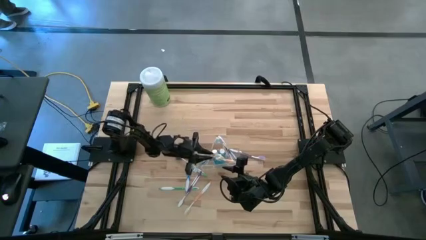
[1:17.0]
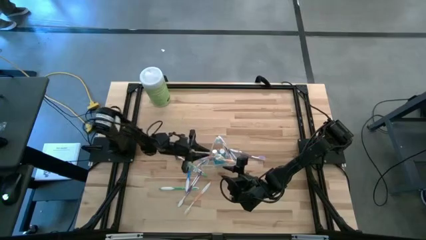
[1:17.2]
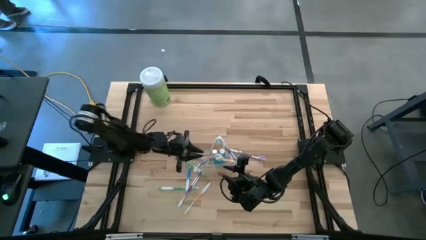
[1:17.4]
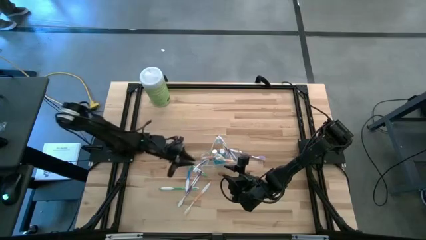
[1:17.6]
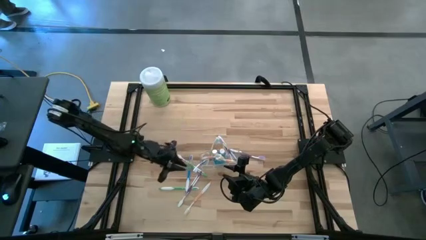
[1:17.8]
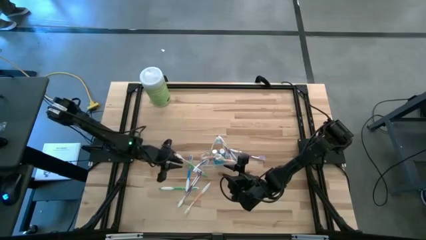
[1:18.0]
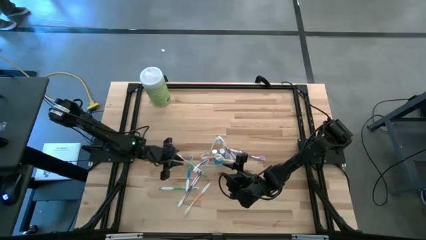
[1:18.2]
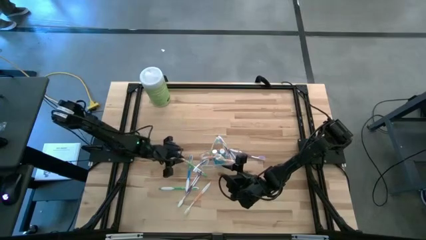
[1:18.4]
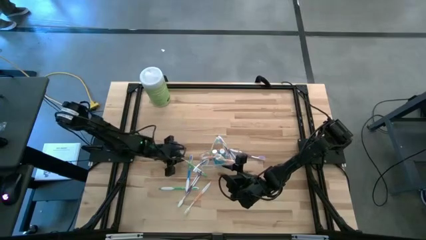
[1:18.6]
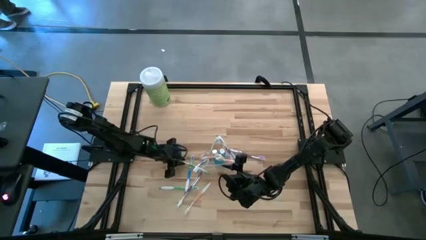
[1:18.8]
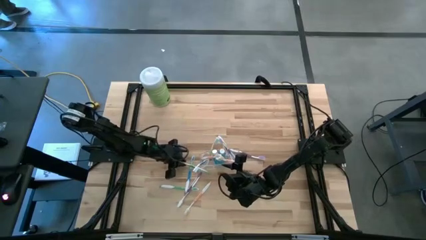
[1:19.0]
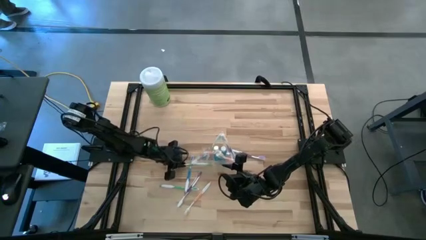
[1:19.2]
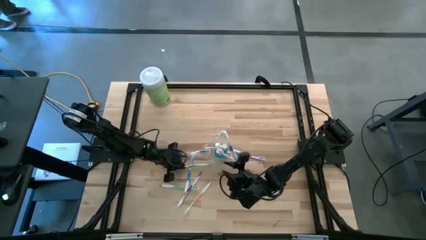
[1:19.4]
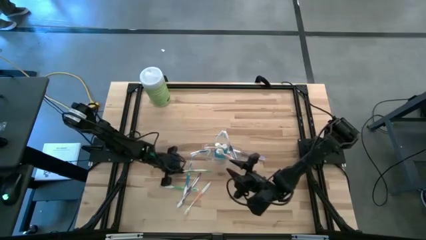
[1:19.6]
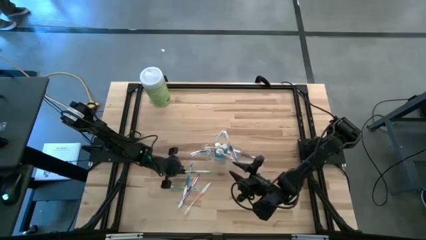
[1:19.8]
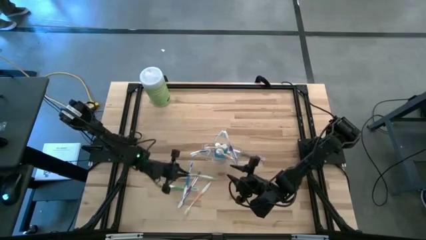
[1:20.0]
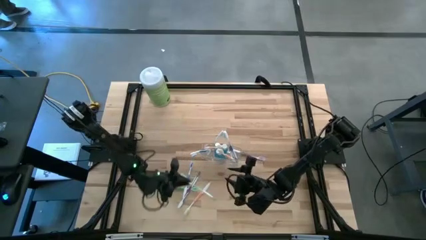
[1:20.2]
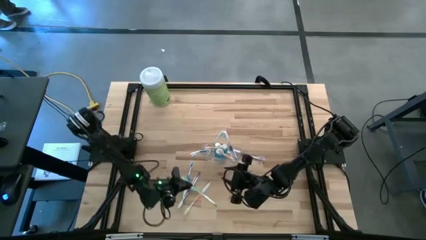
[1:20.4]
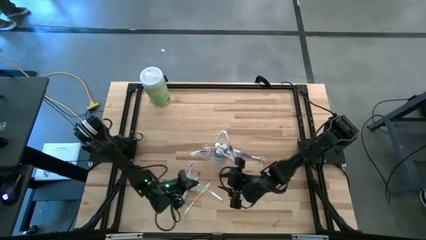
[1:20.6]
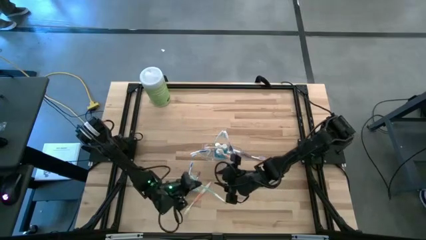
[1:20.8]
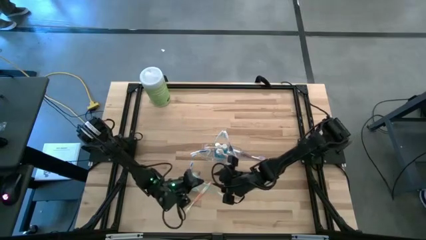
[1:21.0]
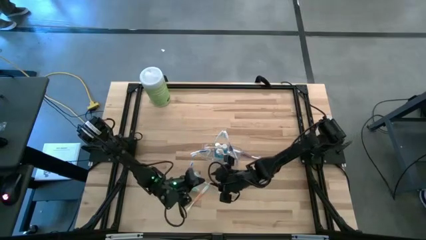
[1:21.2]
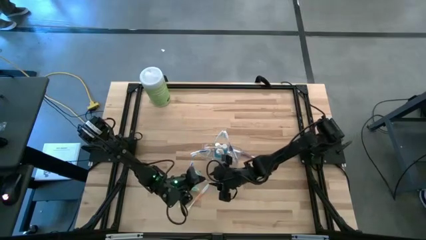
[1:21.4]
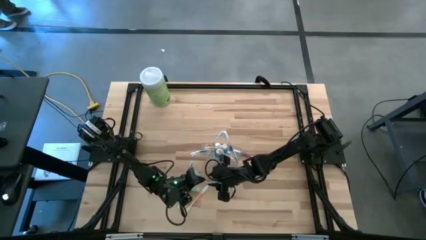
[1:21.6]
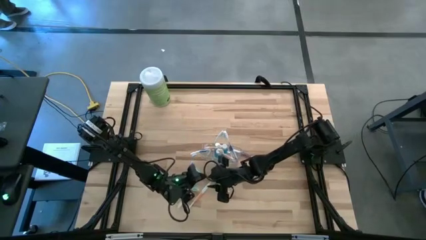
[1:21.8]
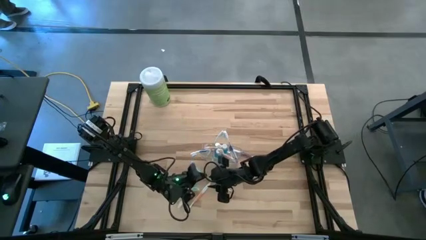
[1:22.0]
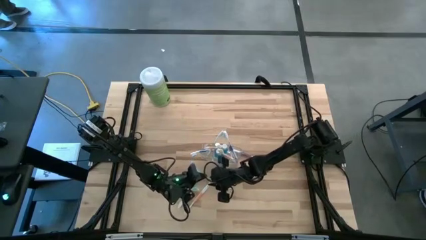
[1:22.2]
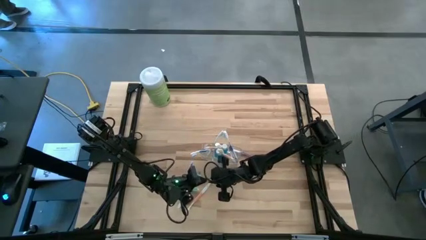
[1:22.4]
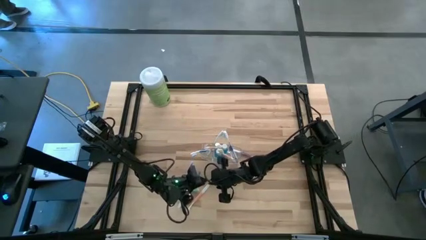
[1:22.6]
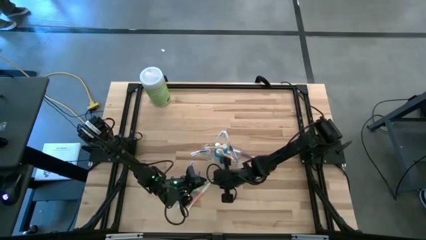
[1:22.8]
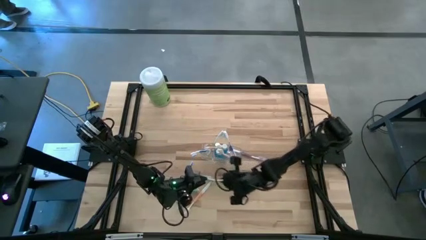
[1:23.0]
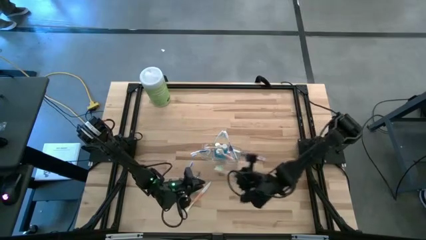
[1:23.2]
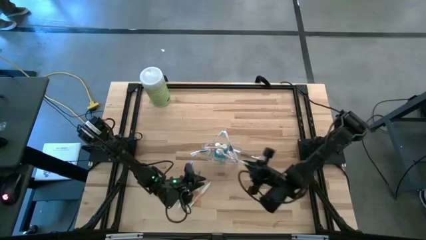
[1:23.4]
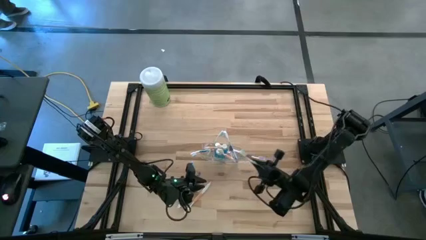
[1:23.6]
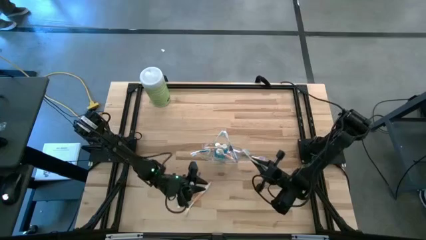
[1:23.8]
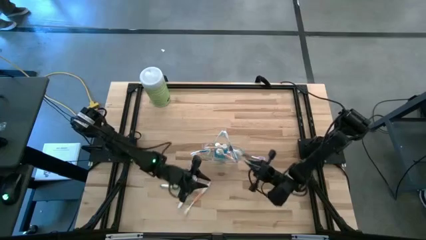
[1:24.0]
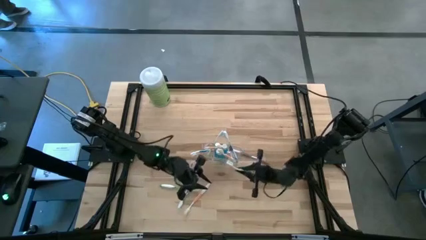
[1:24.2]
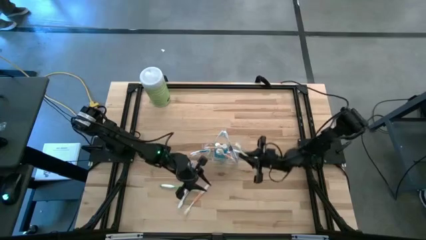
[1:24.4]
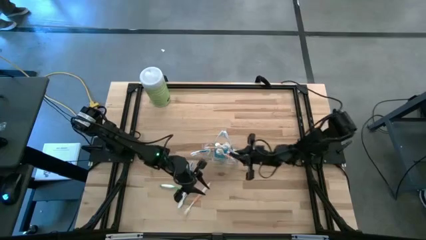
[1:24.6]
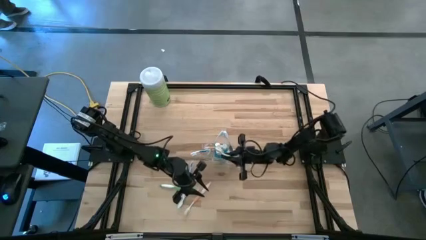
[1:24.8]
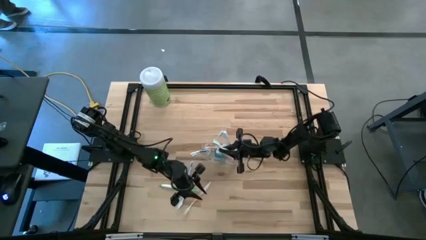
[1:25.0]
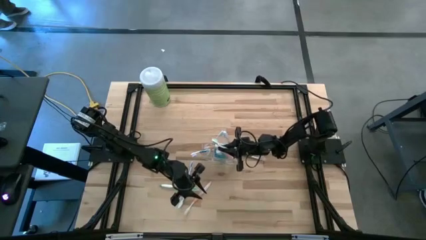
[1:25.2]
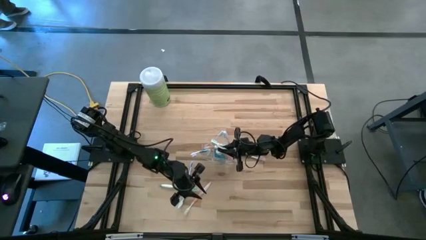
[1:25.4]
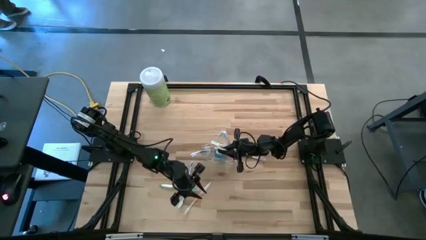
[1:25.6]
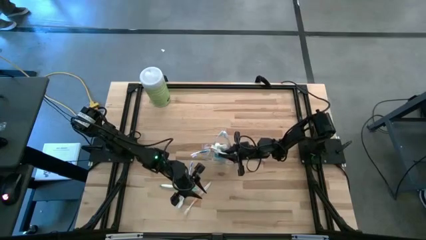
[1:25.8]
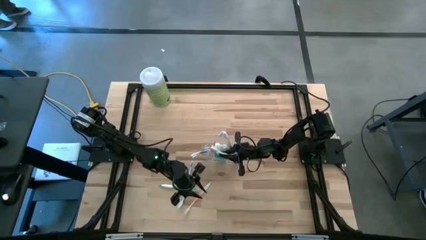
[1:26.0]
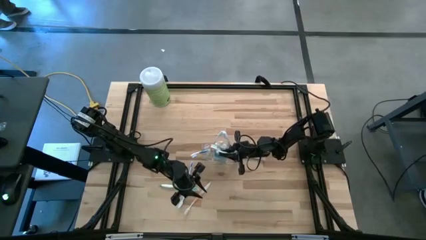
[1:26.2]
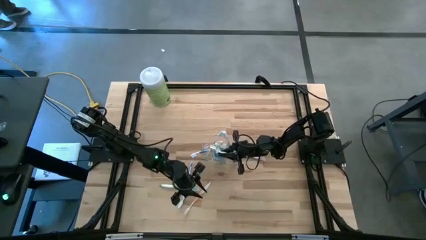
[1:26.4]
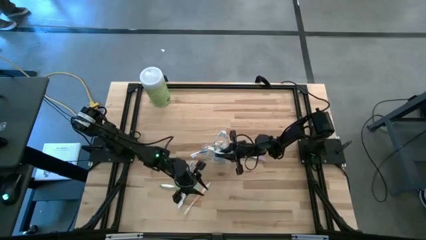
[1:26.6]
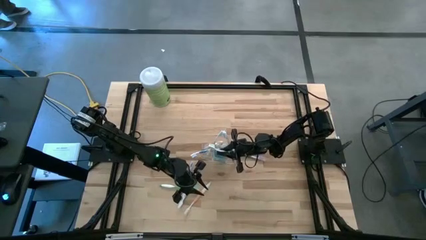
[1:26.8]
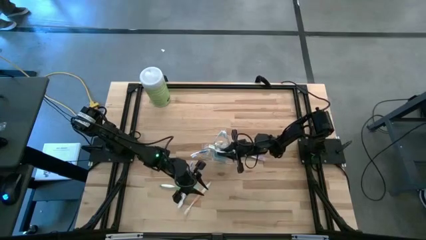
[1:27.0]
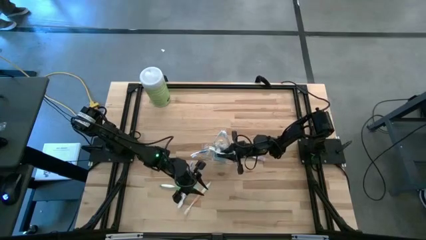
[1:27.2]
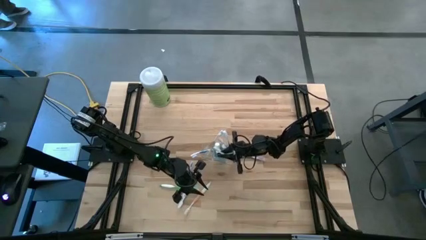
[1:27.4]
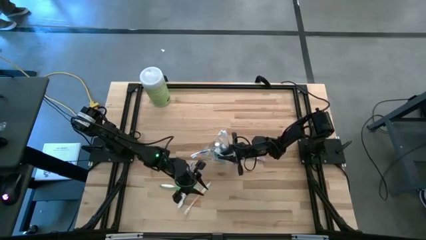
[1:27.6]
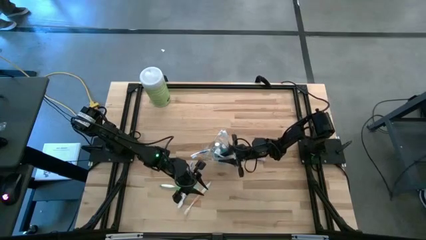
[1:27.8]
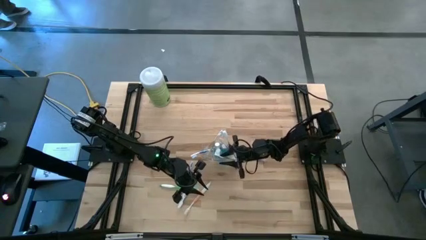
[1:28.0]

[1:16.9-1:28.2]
Task: Pick & Place toothbrushing station
Put the top green toothbrush into the transparent organizer

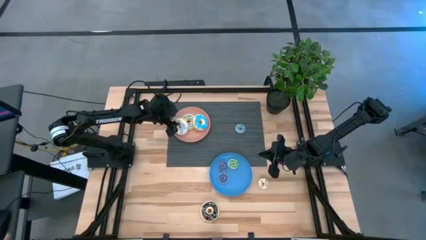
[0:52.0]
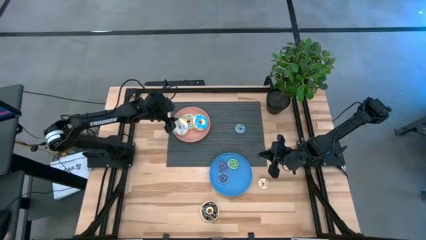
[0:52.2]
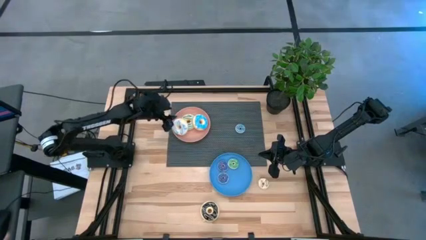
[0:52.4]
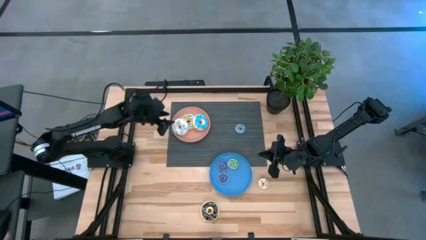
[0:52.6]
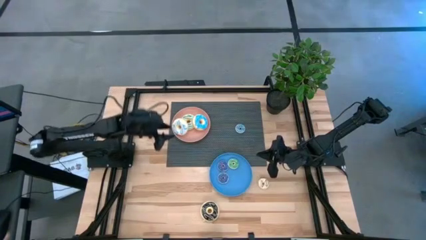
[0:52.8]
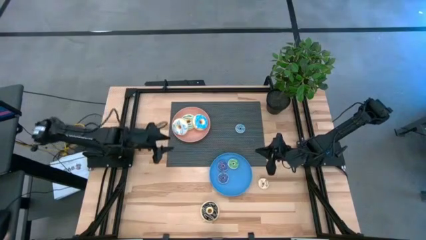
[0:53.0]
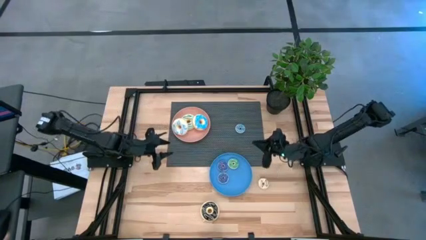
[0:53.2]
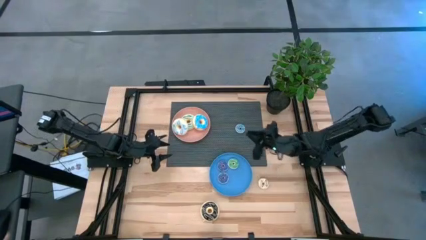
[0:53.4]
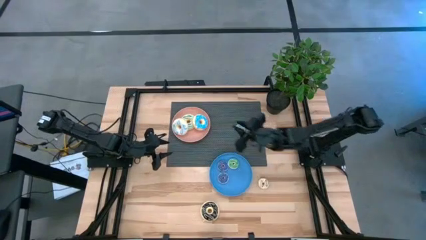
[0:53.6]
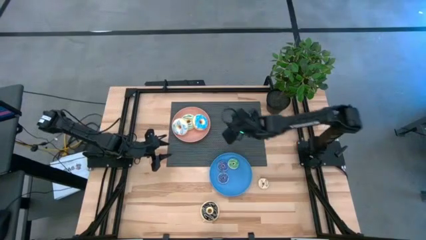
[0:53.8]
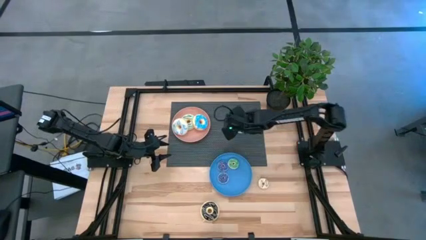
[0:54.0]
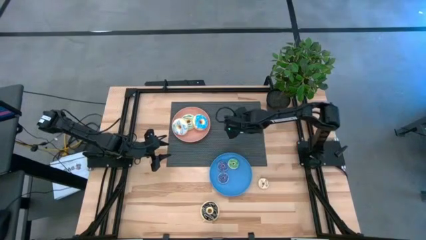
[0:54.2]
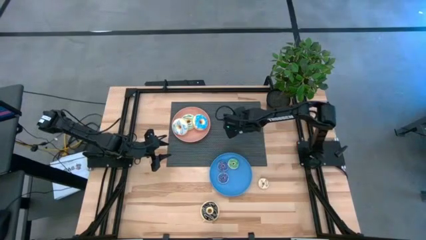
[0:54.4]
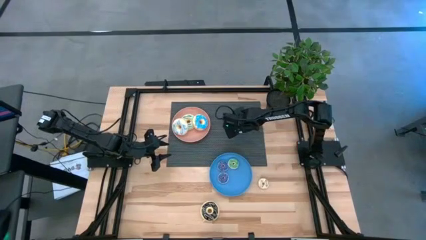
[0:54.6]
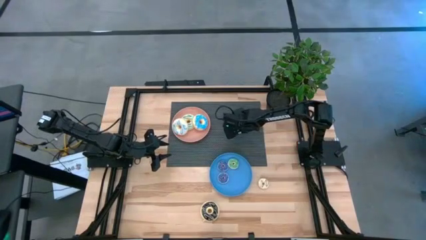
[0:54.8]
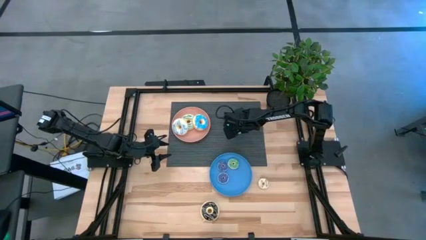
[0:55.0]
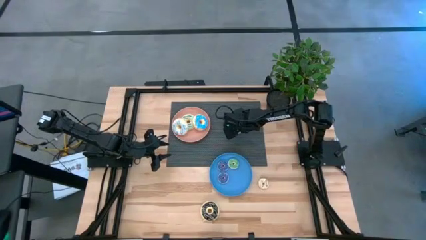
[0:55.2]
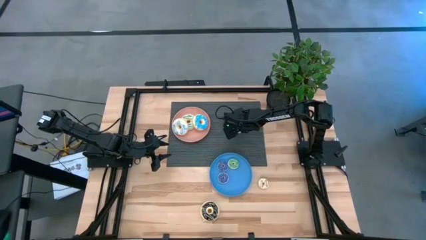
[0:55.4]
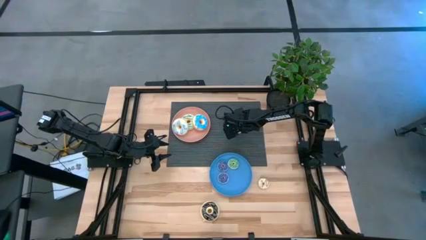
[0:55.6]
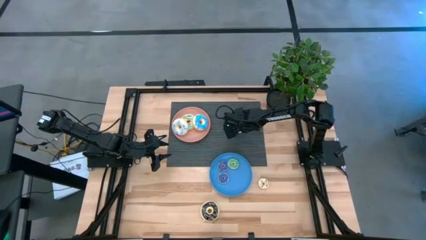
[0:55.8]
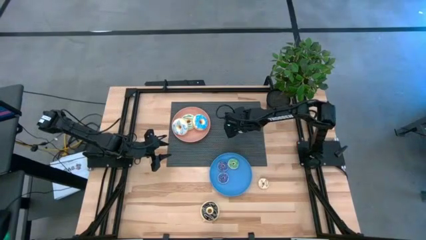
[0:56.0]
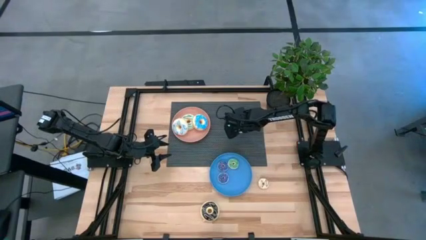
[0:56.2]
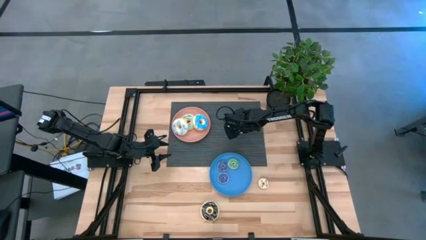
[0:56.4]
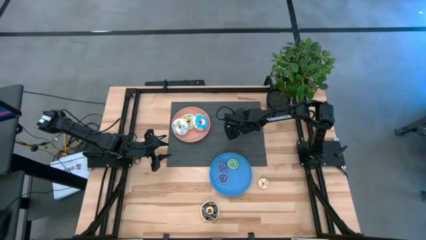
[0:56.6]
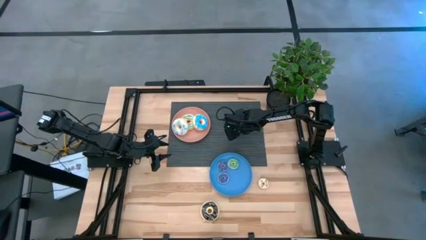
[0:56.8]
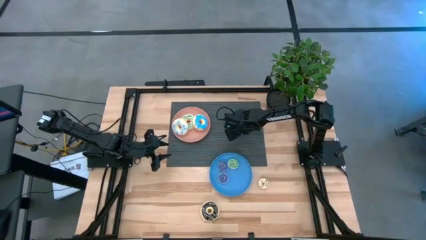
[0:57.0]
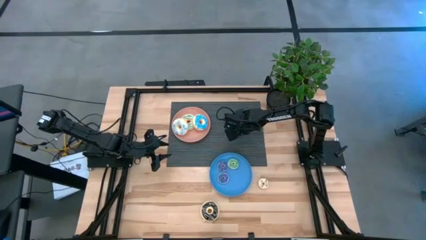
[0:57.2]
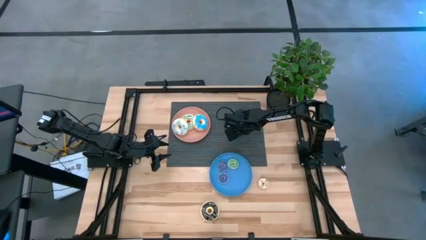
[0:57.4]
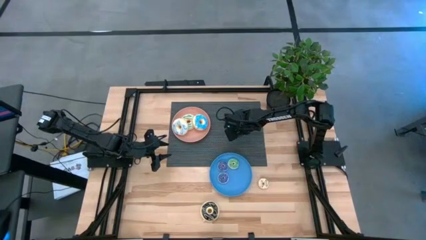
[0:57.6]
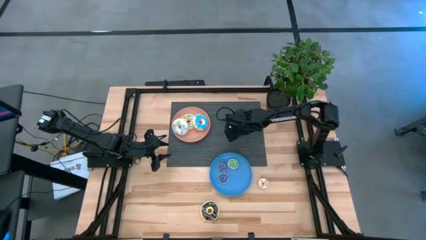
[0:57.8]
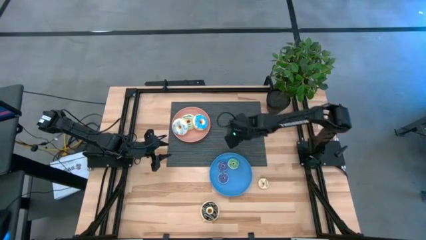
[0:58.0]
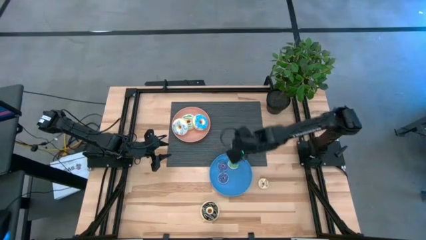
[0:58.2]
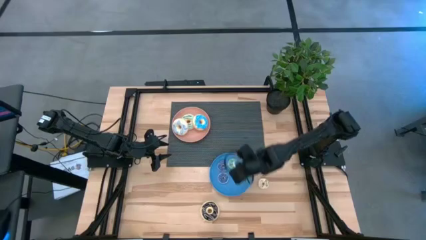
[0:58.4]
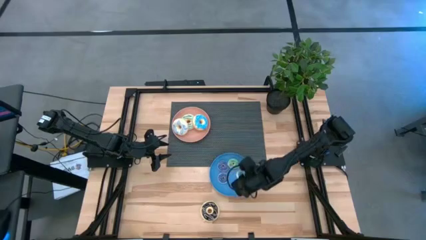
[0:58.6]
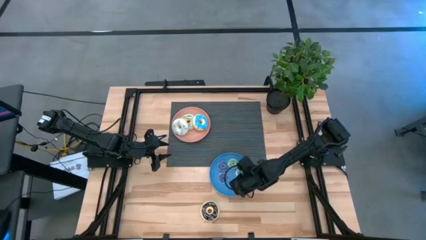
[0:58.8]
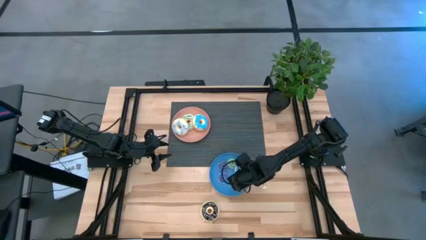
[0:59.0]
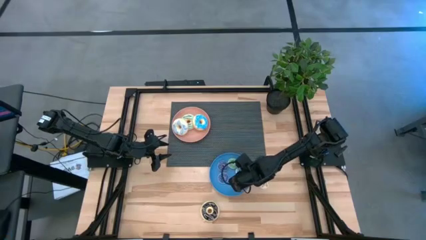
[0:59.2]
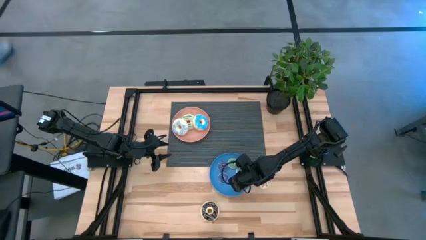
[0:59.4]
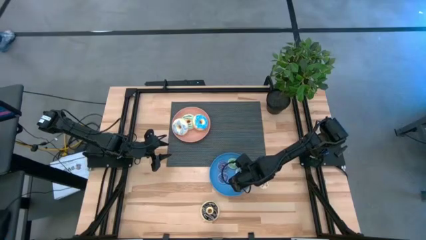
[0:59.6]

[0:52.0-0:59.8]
Task: Pick & Place donuts
Put the small blue donut into the blue plate
